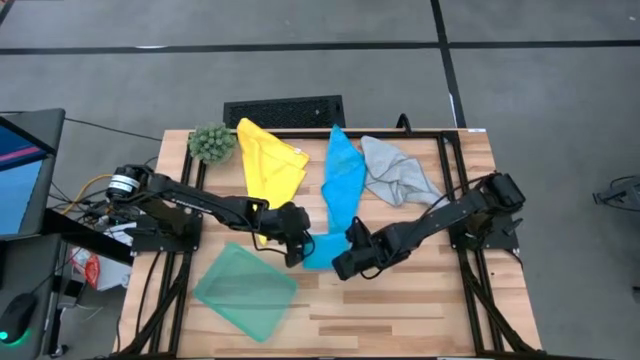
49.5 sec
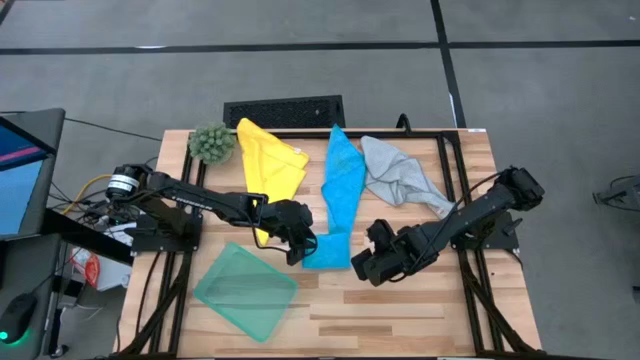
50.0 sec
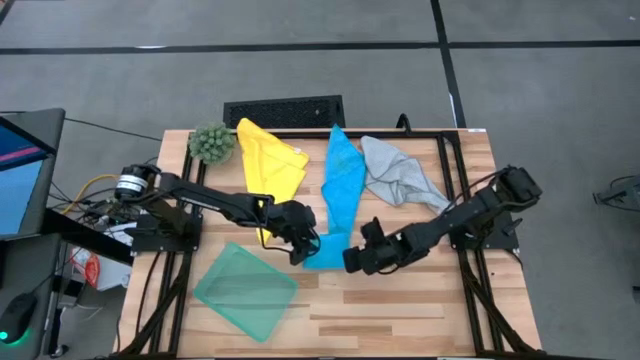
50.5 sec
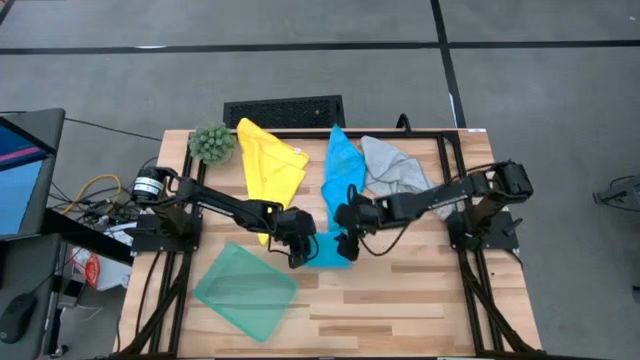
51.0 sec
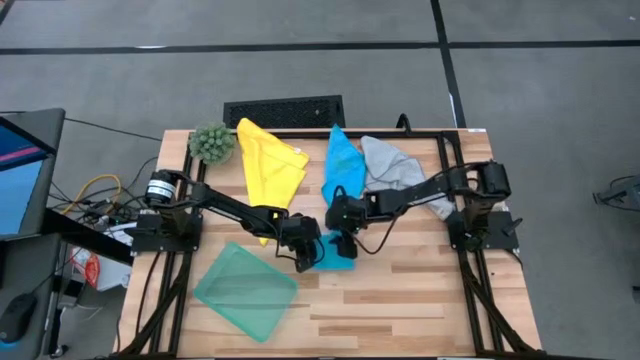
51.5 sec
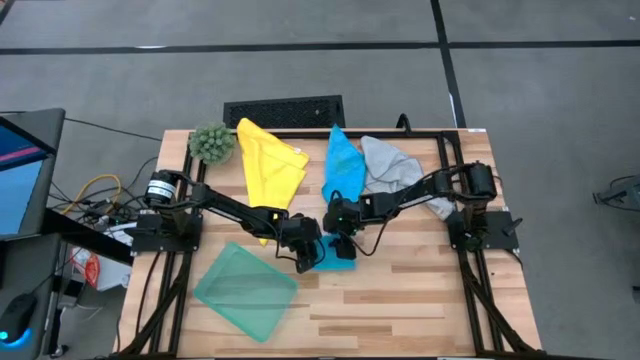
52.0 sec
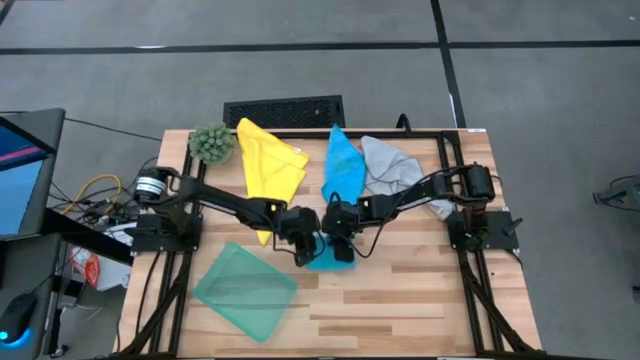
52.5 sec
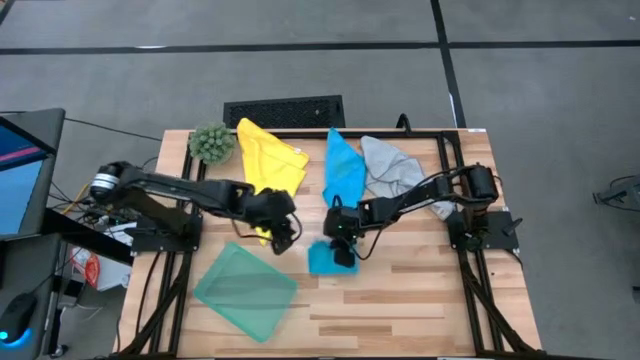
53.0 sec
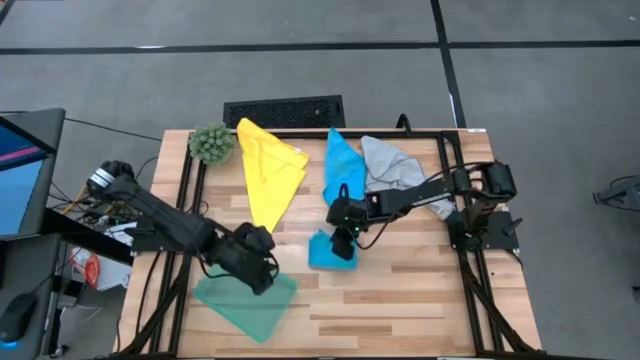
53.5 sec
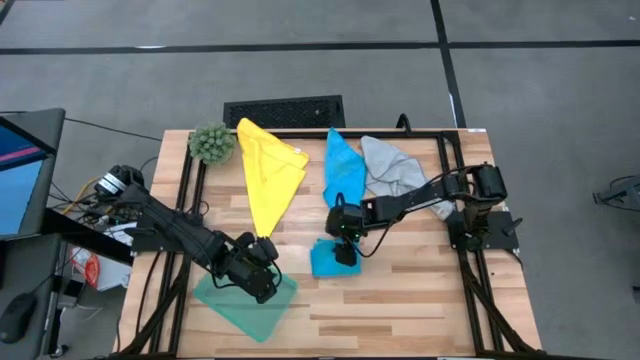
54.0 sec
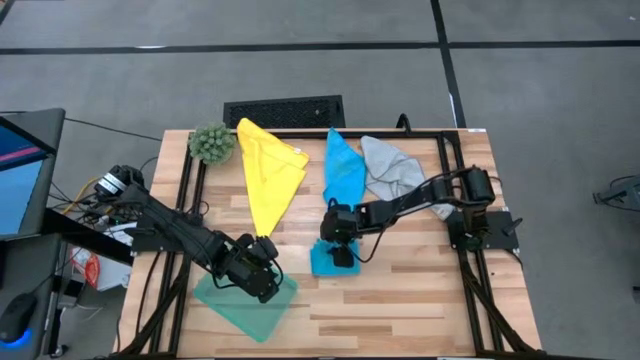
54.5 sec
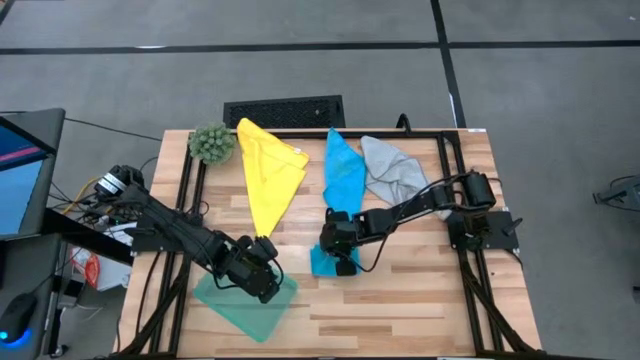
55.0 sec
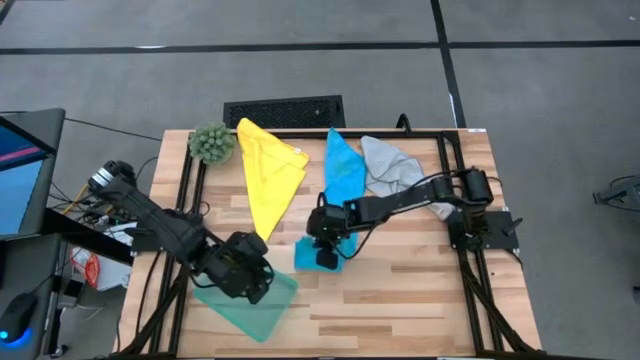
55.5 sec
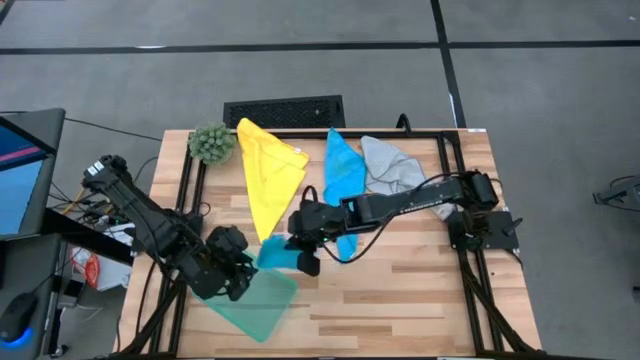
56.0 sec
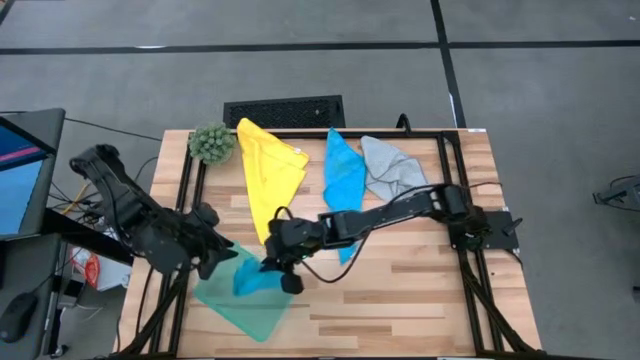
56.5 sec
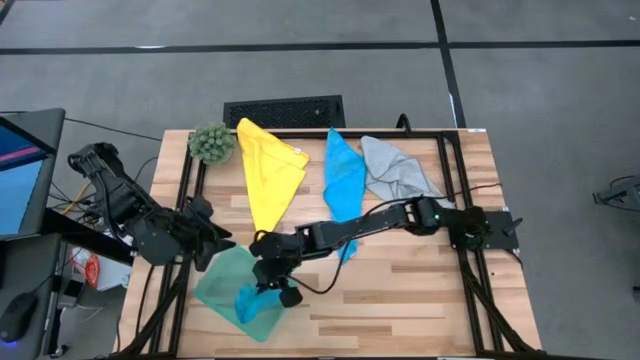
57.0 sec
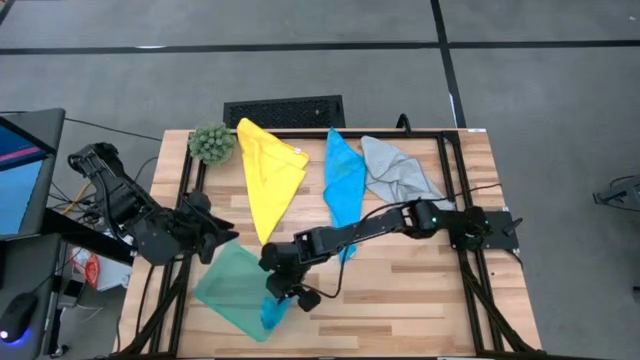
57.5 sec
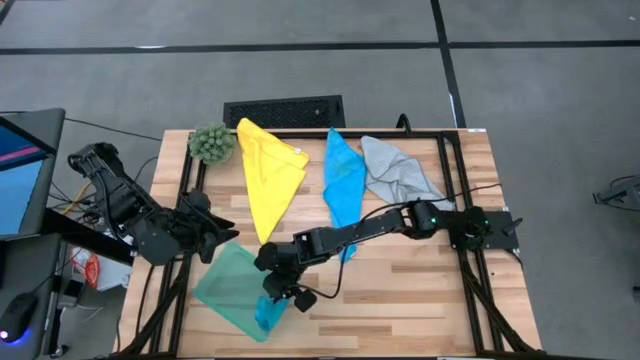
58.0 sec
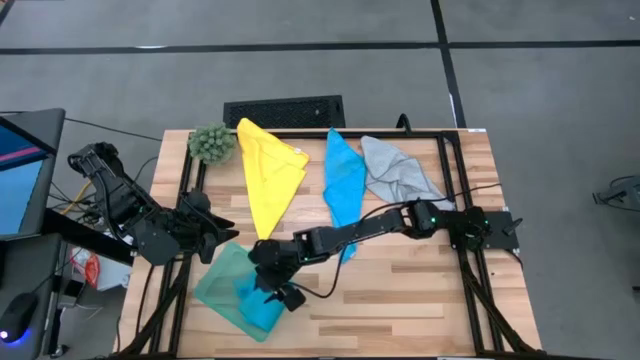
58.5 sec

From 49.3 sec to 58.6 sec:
Task: Fold microfiber towels
Put the folded blue towel into the blue bin

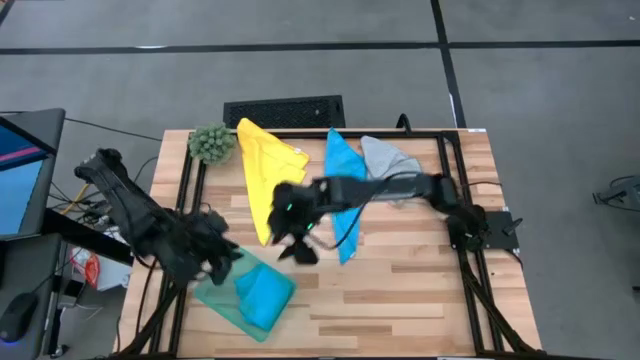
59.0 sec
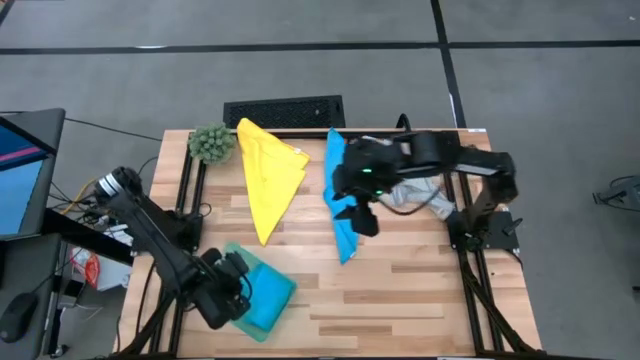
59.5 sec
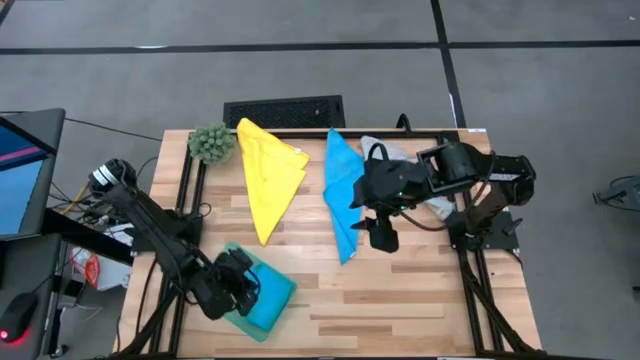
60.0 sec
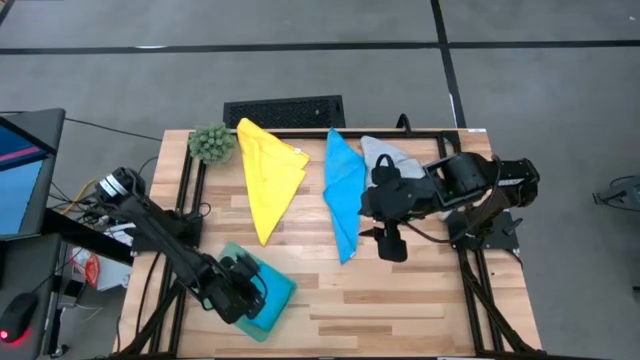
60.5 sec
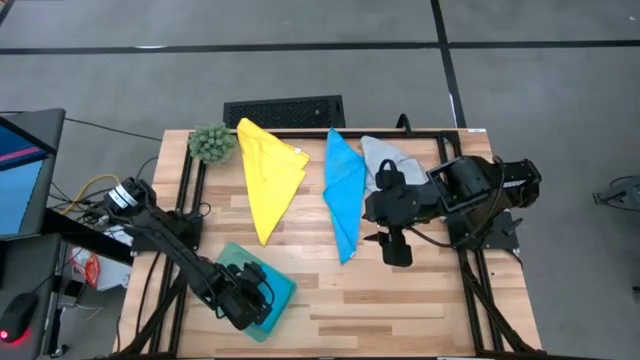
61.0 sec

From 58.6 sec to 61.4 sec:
Adjust the folded blue towel in the bin

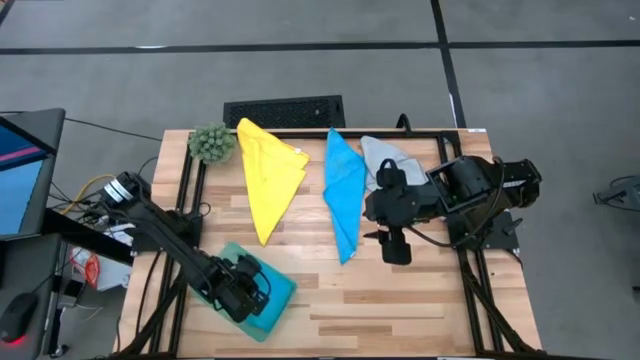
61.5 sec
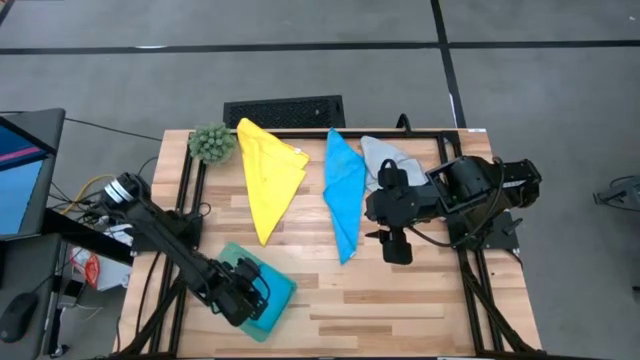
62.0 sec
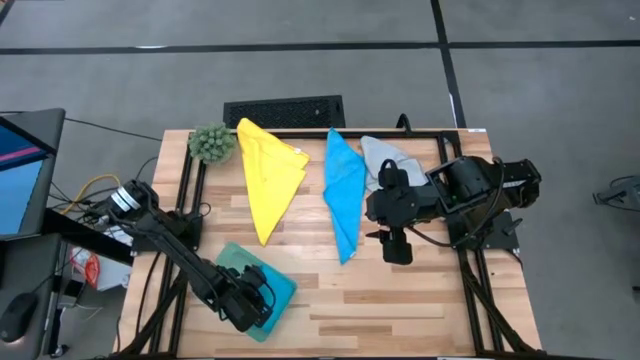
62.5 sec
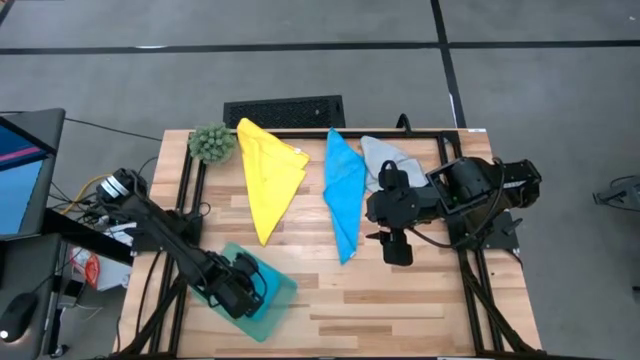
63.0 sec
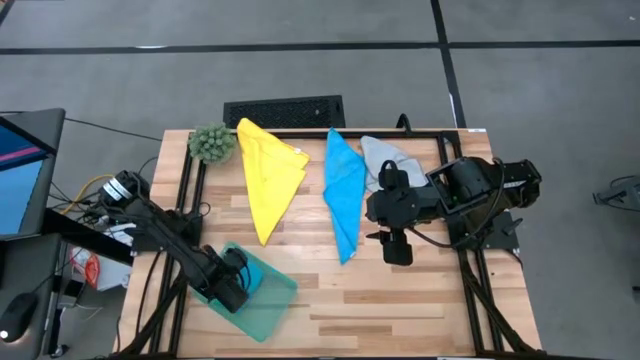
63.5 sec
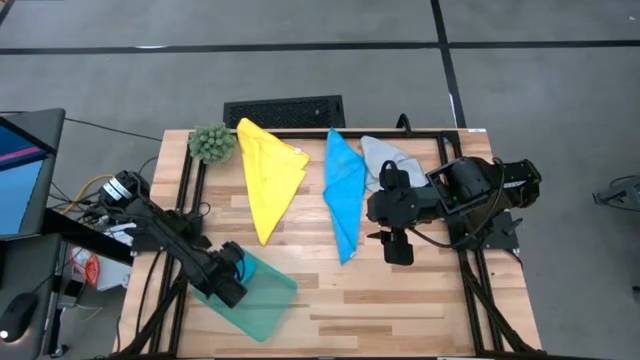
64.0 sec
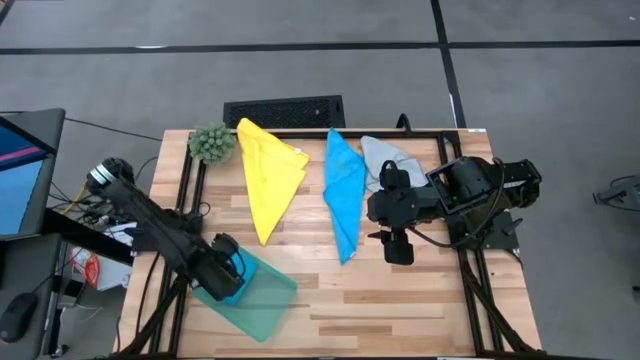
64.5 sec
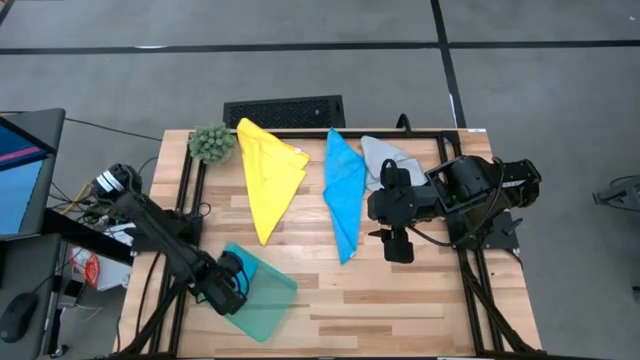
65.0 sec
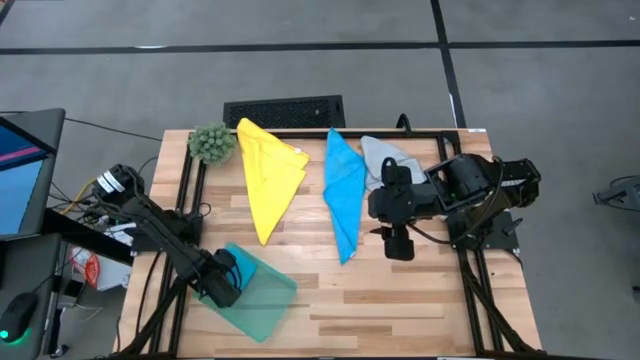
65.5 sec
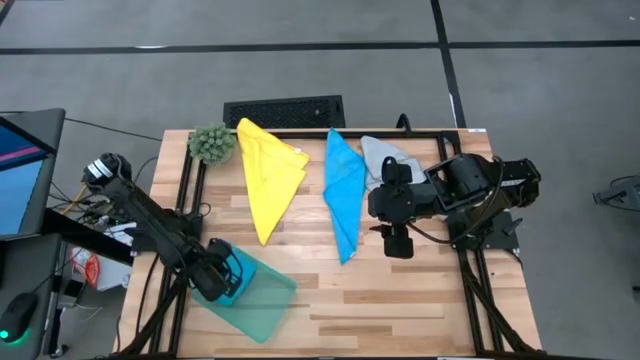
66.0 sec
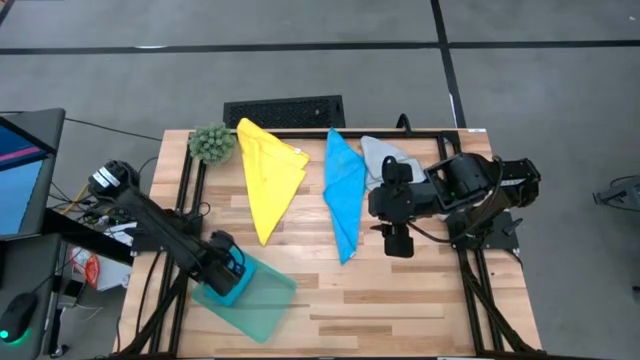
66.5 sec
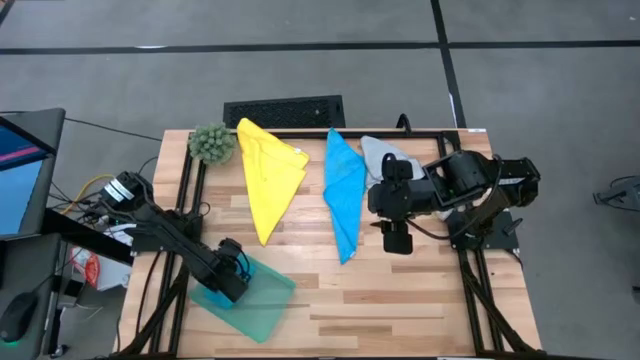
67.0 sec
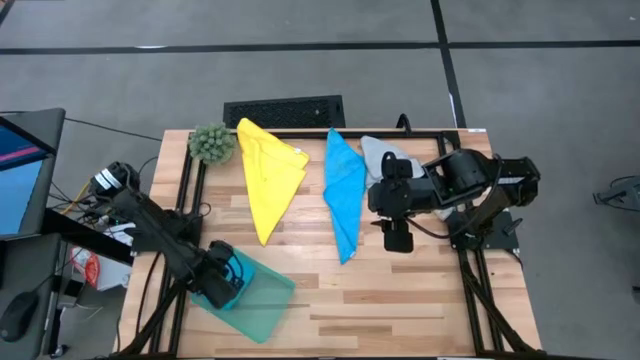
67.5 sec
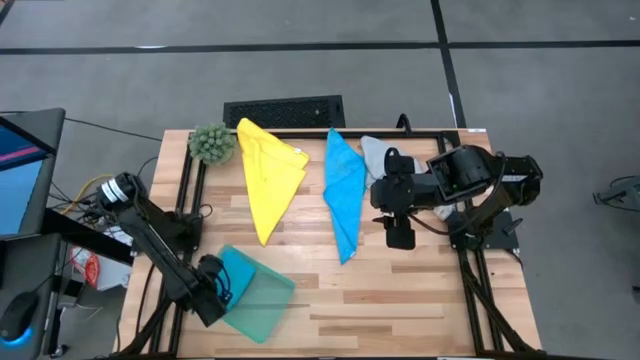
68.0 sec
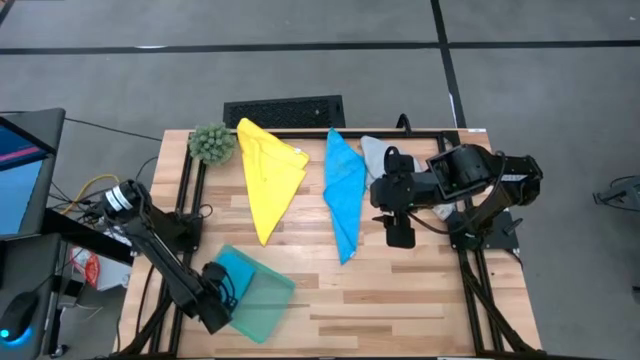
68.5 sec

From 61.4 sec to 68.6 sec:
Adjust the folded blue towel in the bin

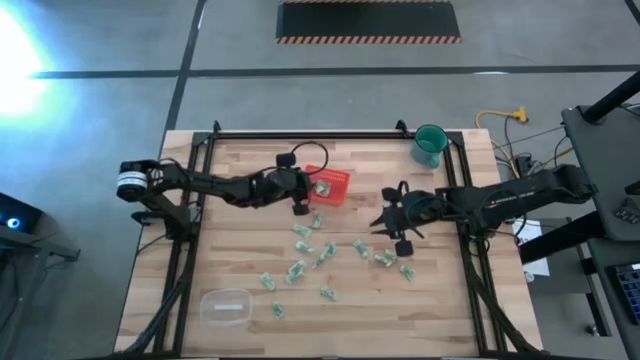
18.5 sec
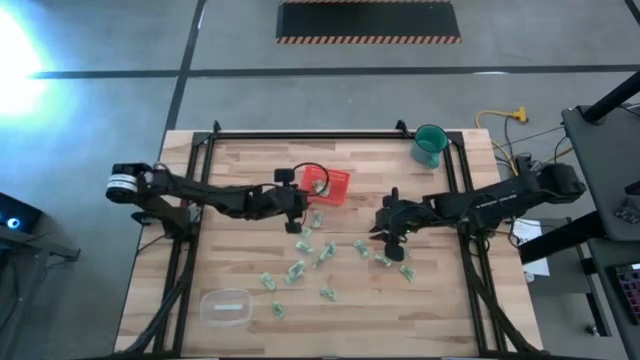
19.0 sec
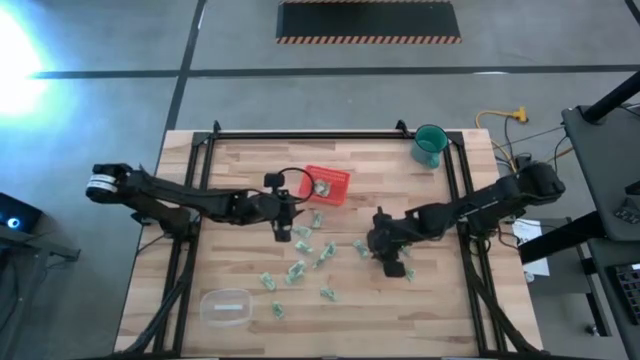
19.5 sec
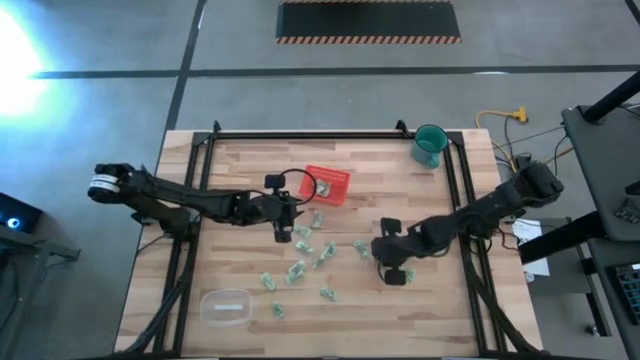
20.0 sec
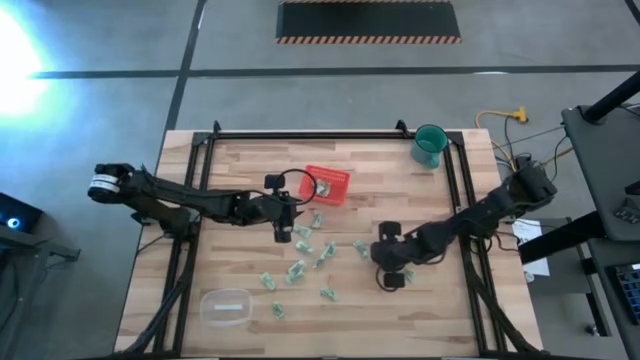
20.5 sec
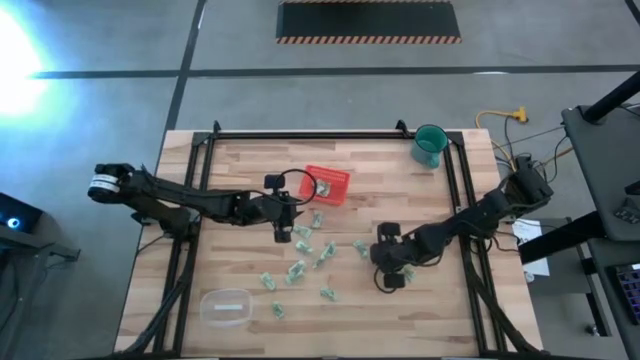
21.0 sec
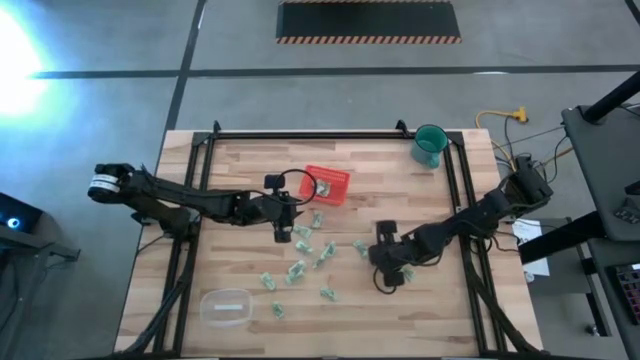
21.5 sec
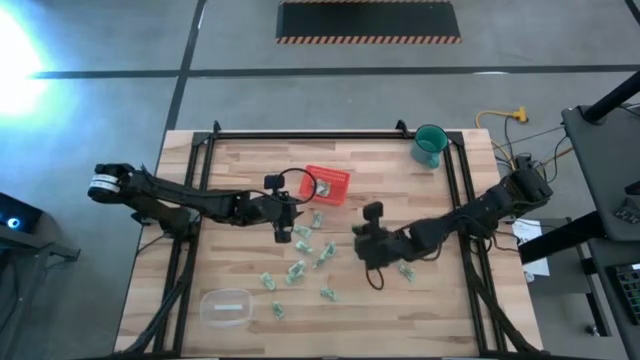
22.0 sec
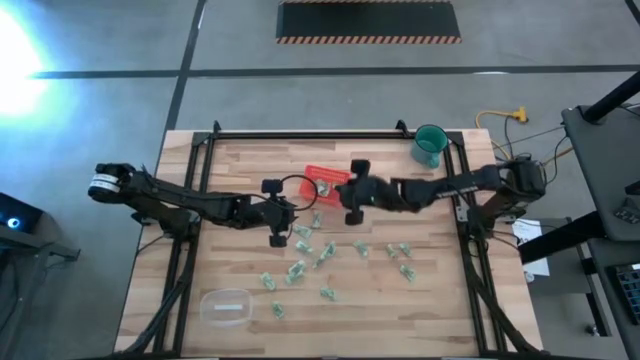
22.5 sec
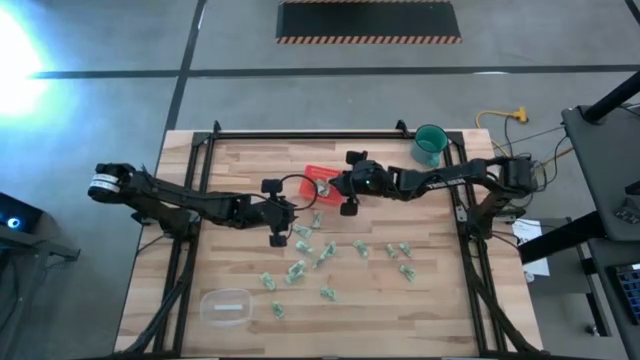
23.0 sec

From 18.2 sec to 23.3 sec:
Task: Pick and place items into bin
Put the stevia packet into the orange bin
